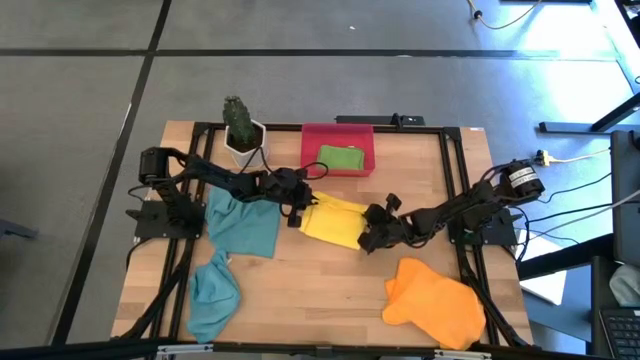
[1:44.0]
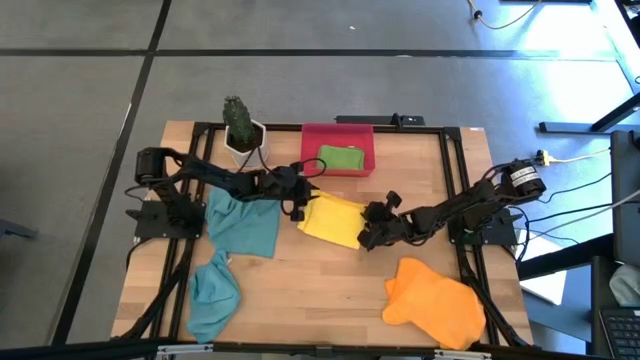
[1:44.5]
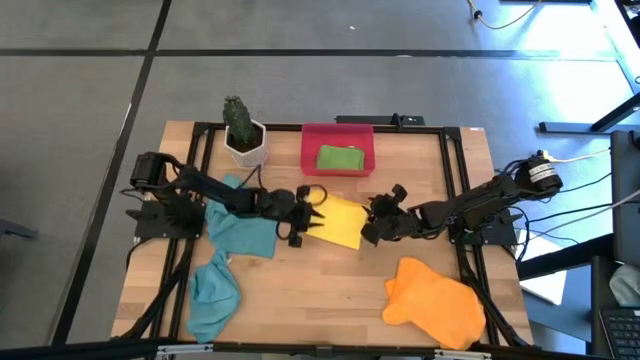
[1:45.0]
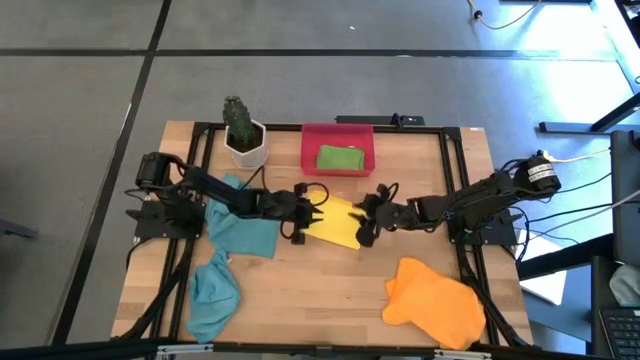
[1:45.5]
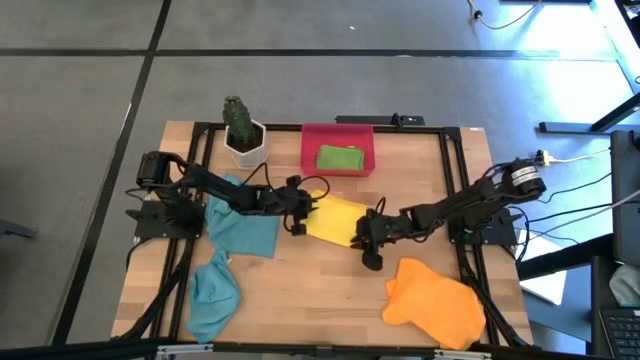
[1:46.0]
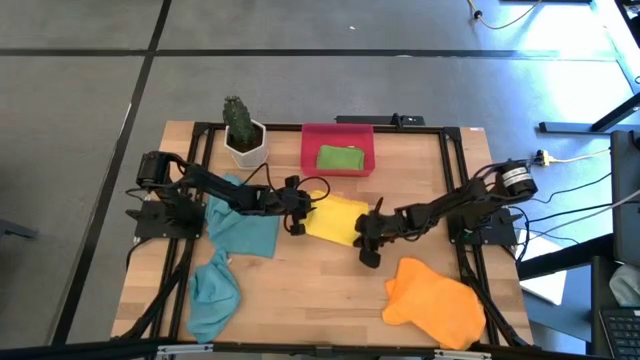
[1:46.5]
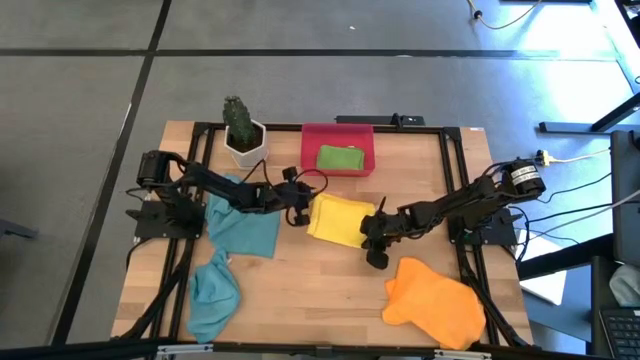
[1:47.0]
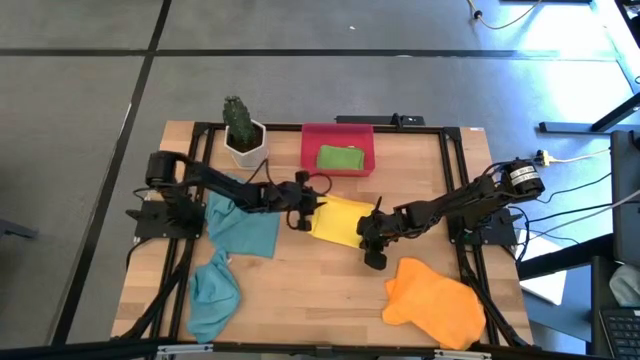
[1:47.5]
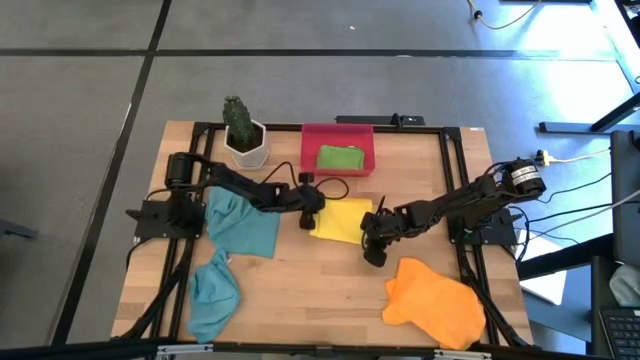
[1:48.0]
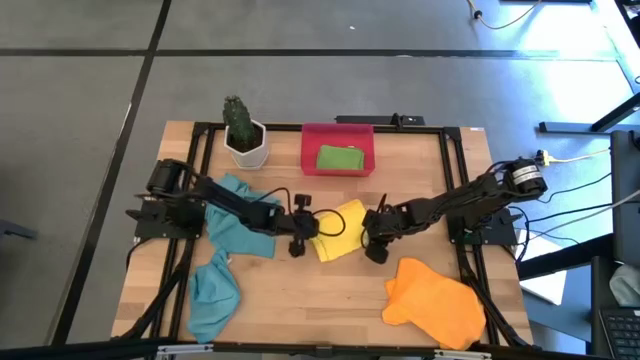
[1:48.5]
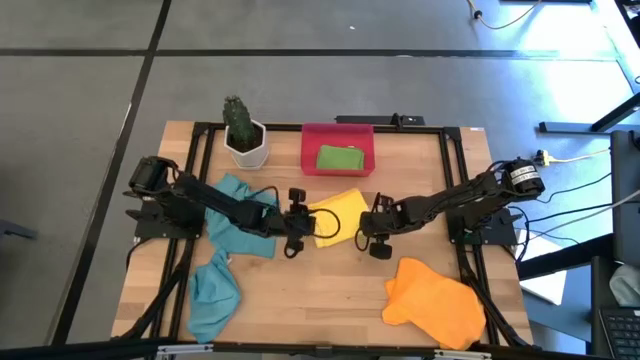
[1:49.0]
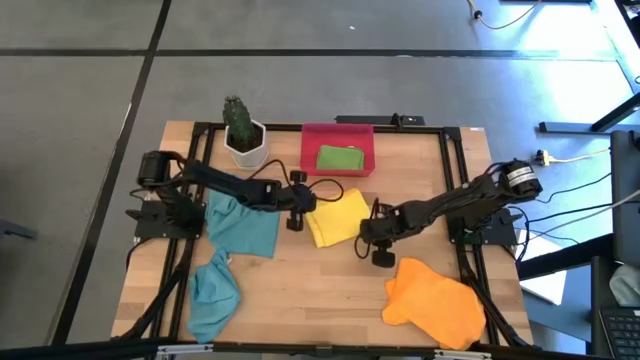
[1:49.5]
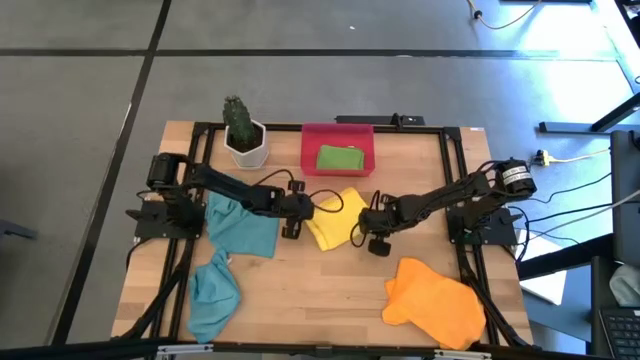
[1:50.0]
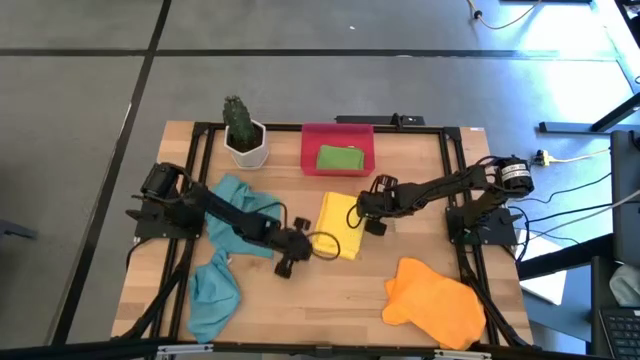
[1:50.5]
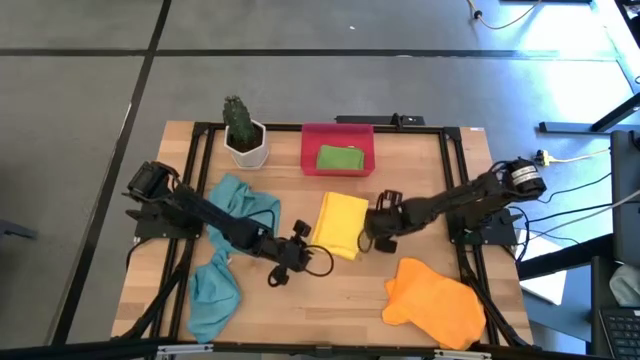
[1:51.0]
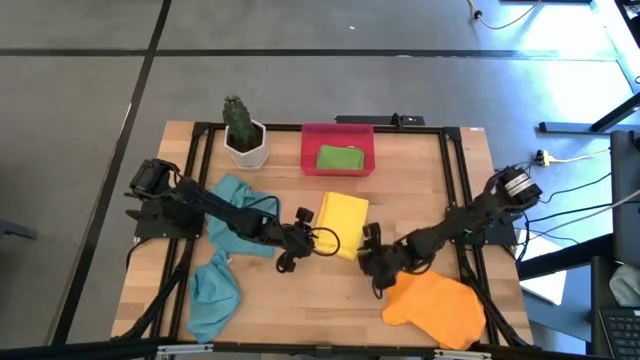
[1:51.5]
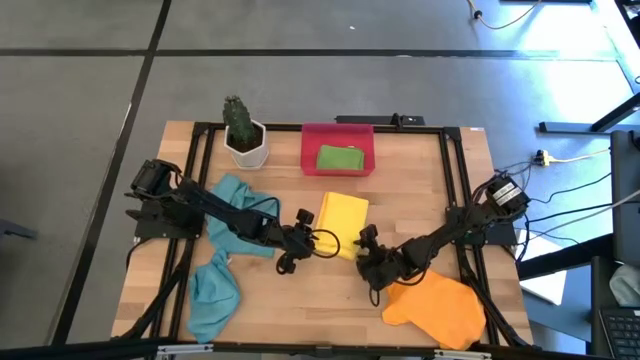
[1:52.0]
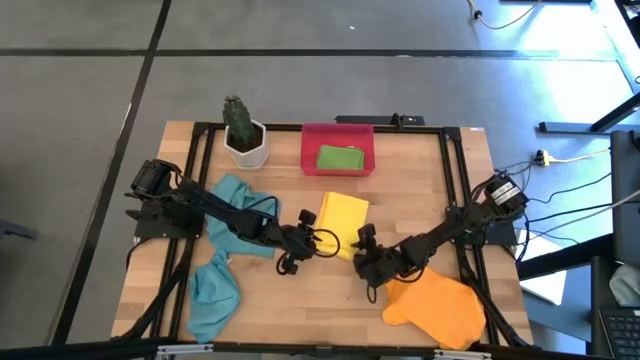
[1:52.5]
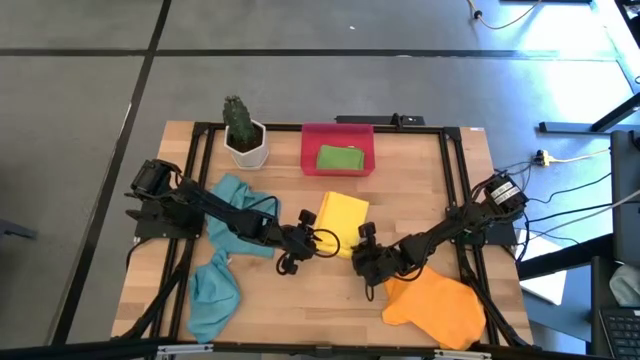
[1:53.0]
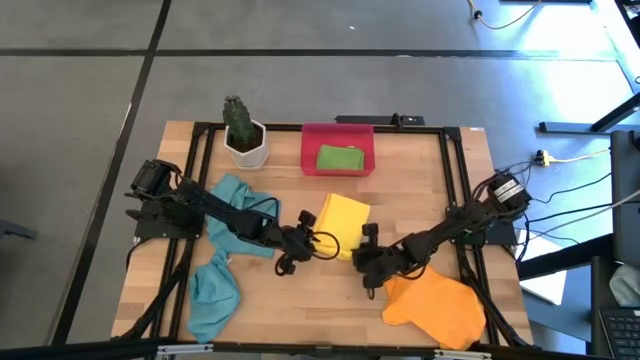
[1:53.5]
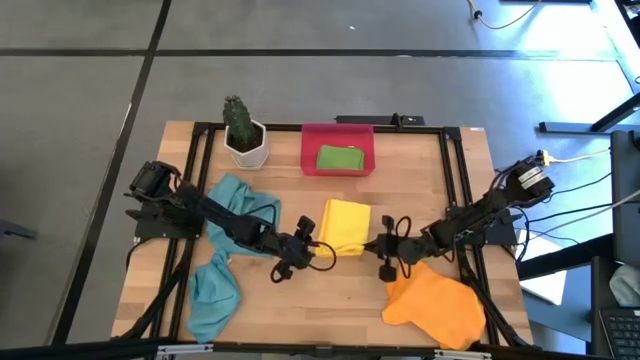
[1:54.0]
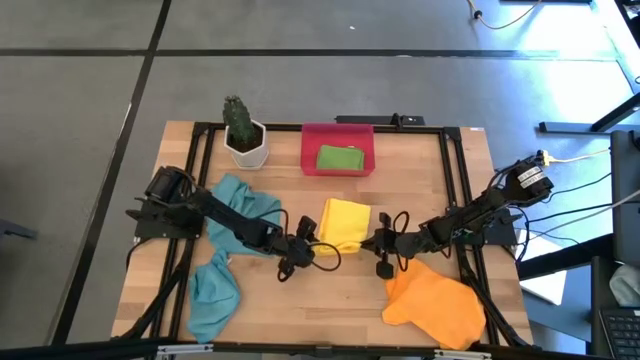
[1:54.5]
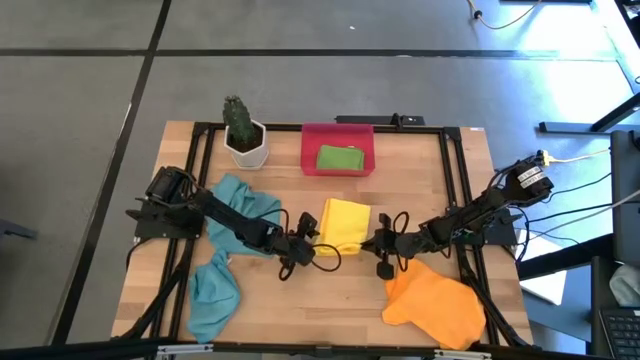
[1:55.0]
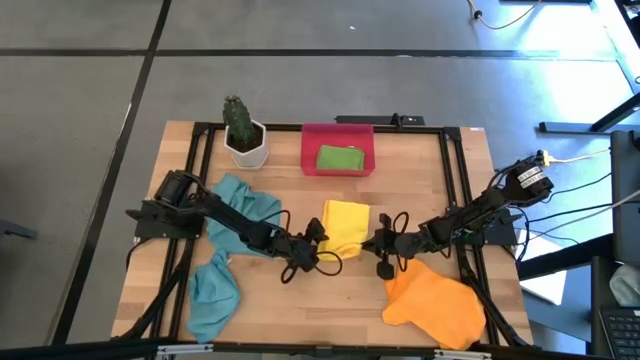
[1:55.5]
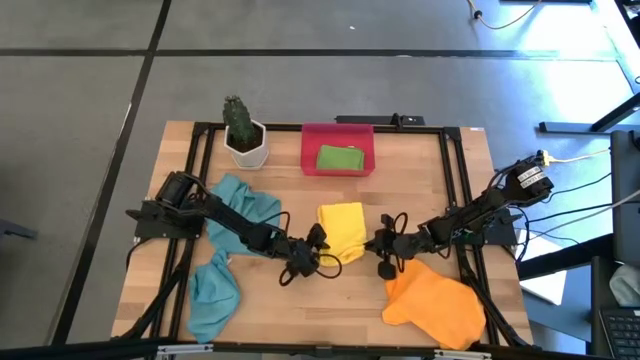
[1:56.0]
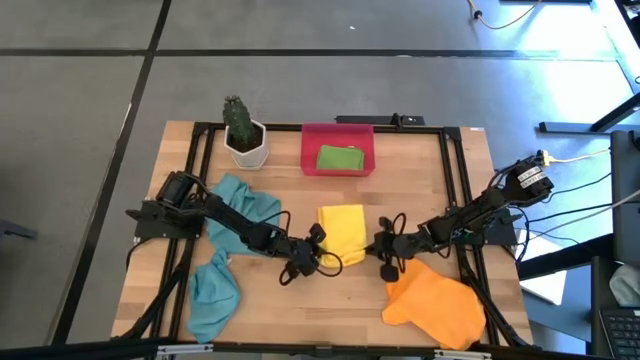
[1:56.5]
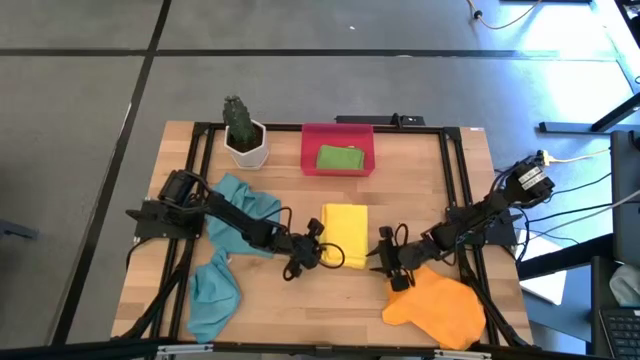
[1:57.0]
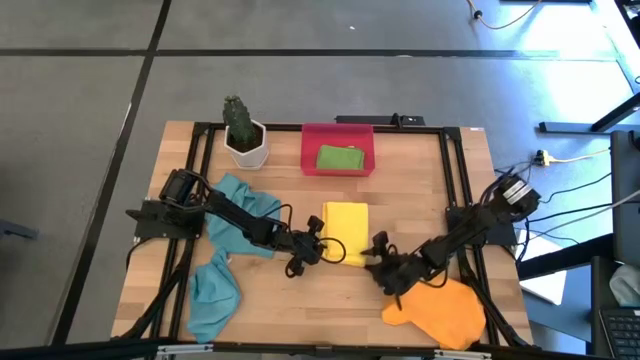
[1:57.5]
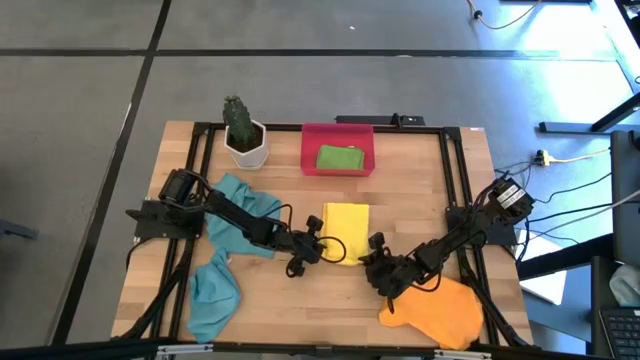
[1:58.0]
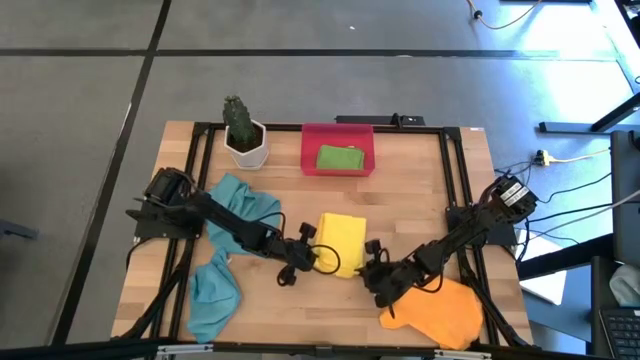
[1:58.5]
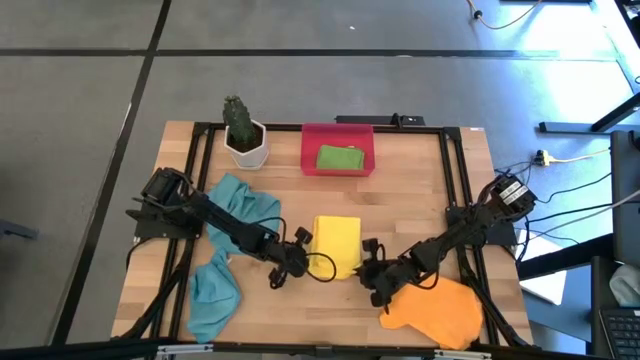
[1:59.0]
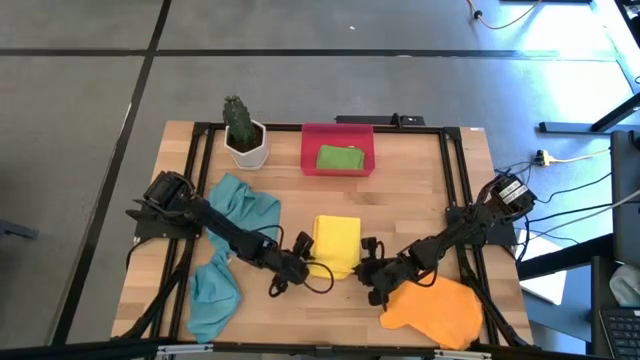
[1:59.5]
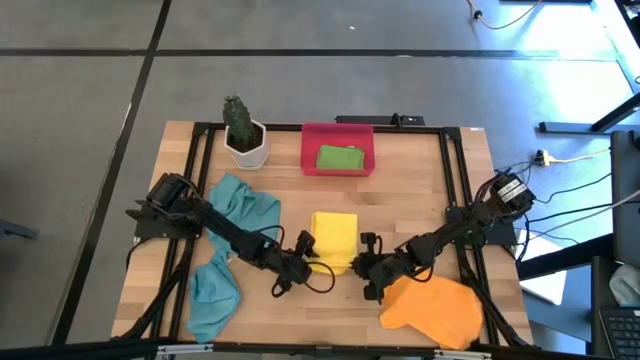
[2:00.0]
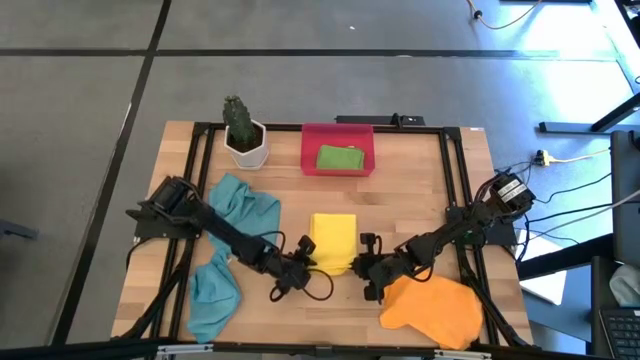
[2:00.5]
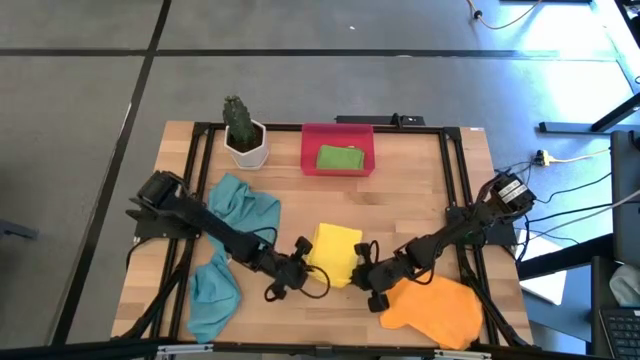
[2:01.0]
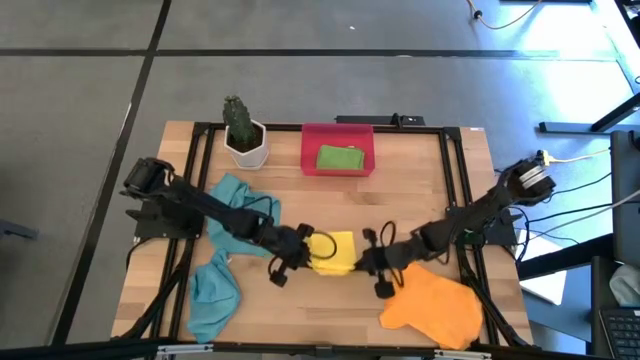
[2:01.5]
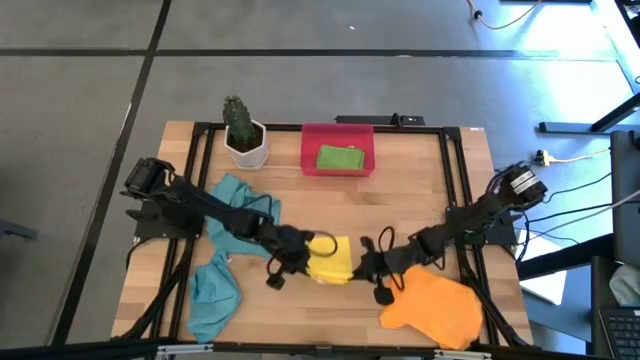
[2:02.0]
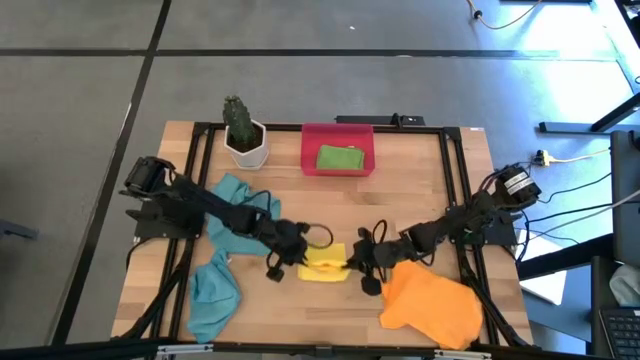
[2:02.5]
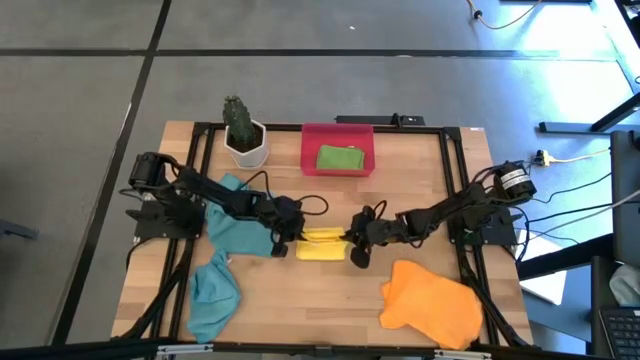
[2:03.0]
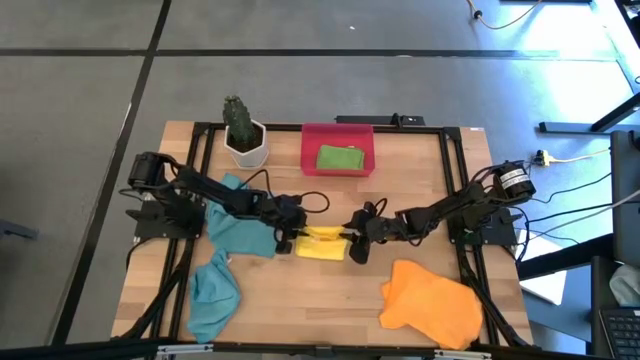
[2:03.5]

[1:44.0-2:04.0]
Task: Fold microfiber towels
Fold the yellow microfiber towel
